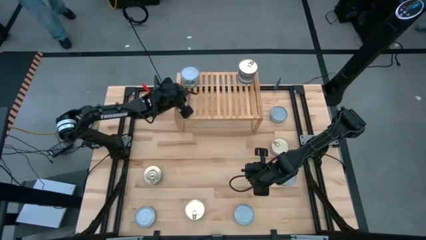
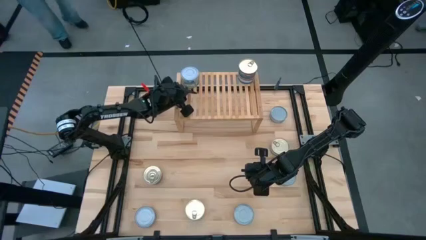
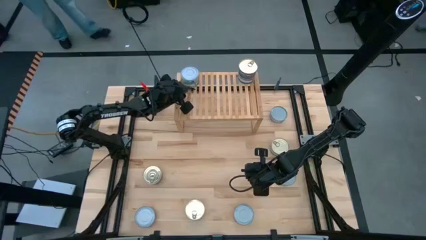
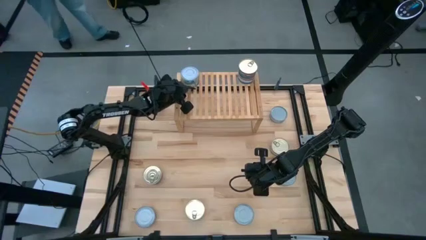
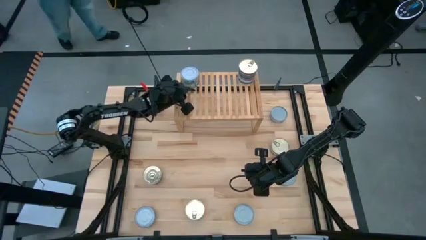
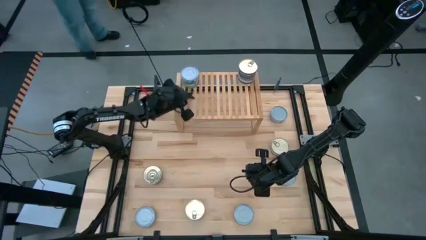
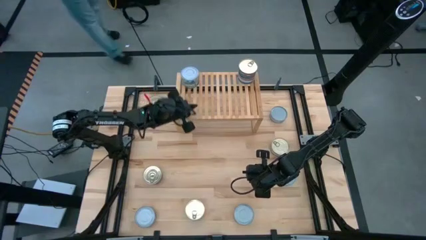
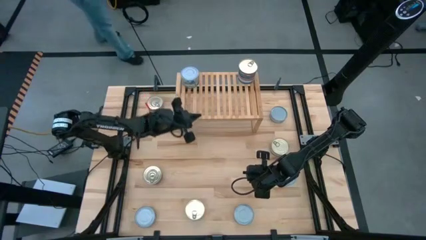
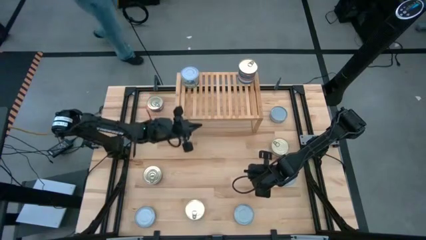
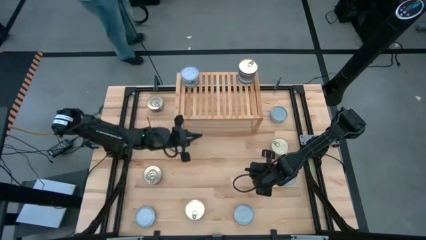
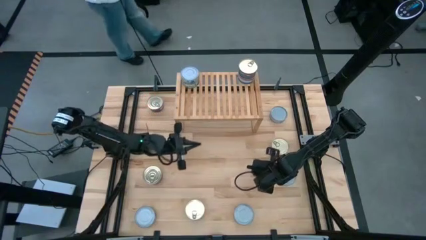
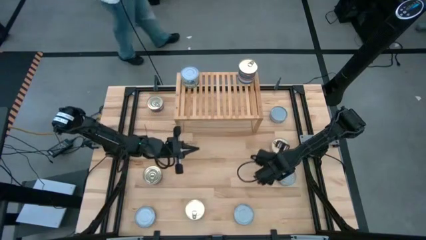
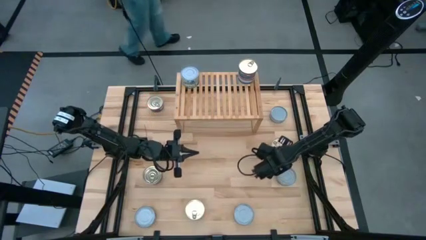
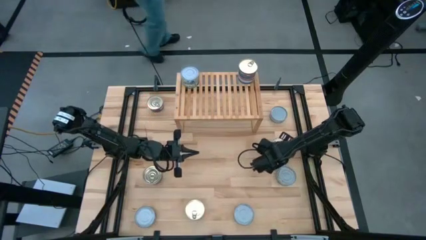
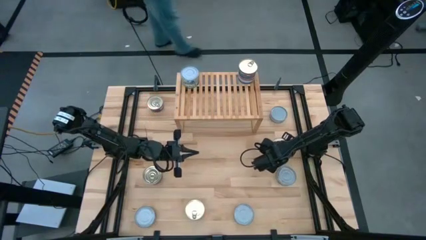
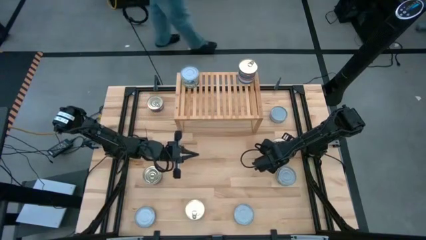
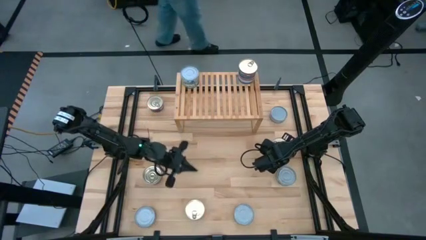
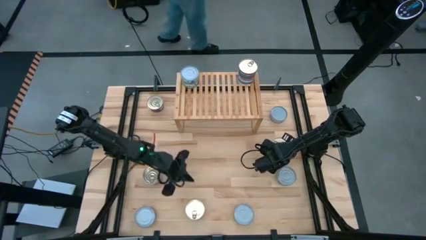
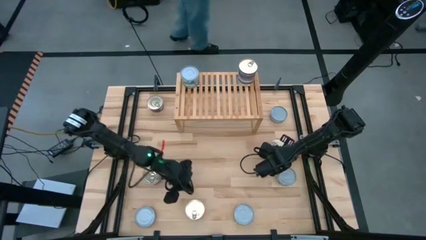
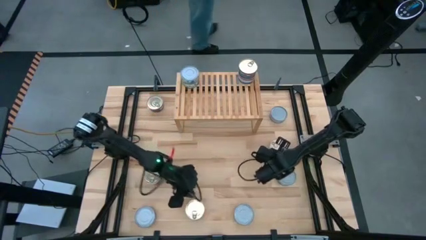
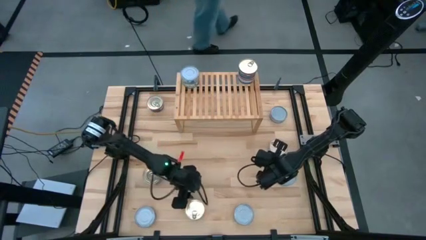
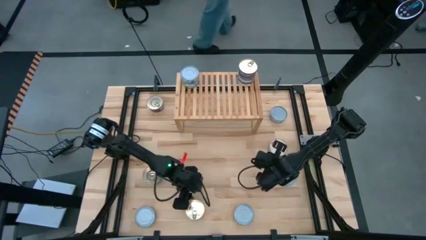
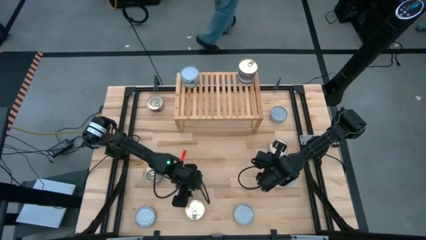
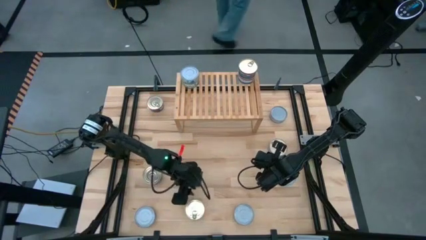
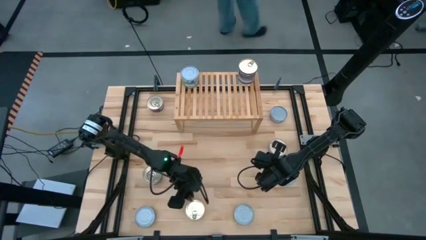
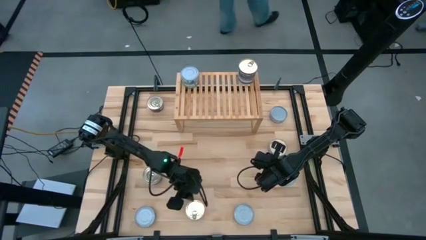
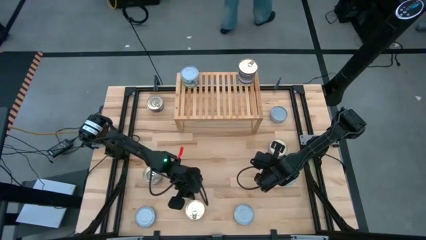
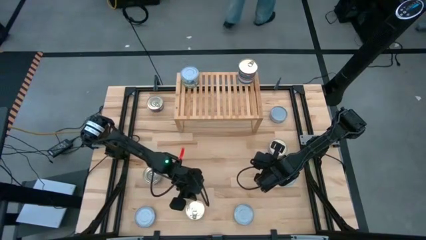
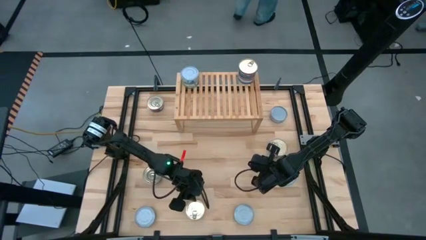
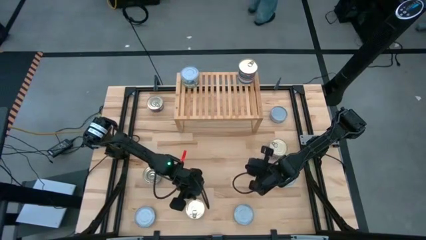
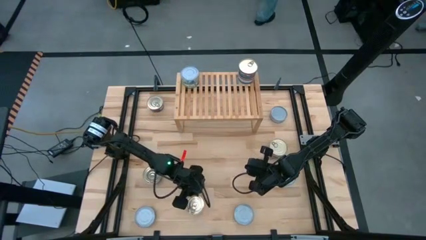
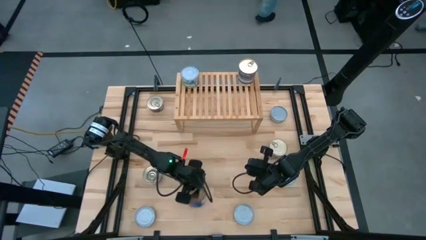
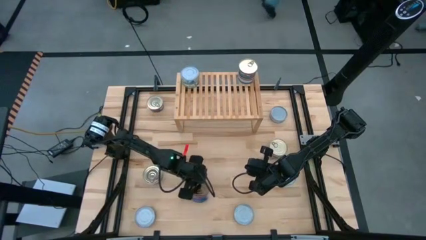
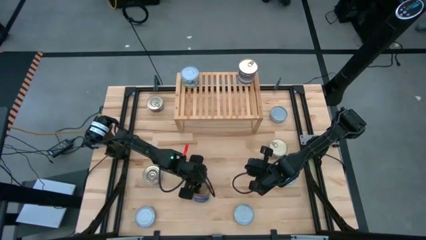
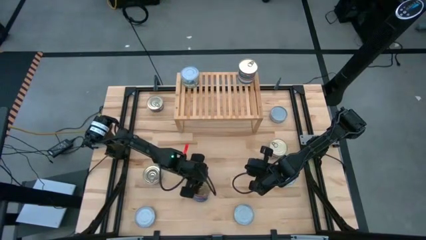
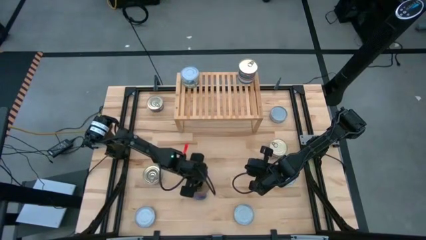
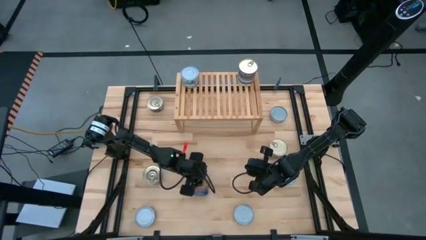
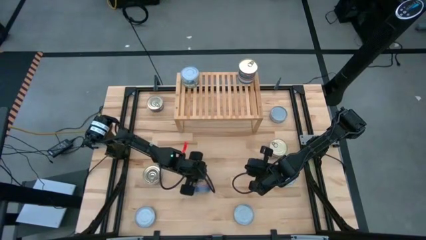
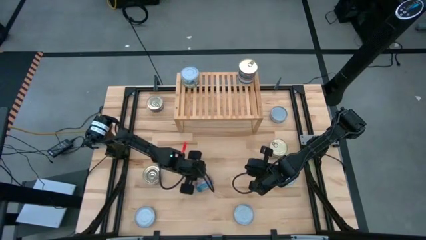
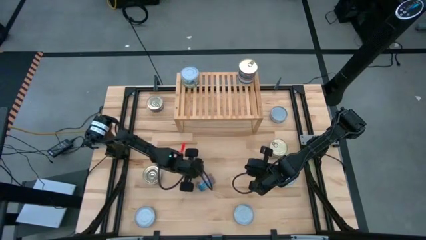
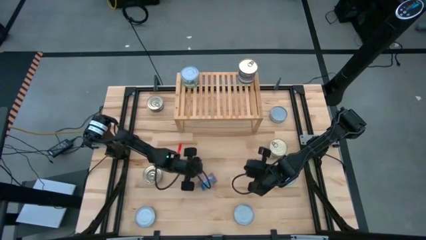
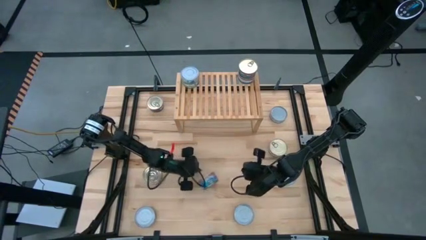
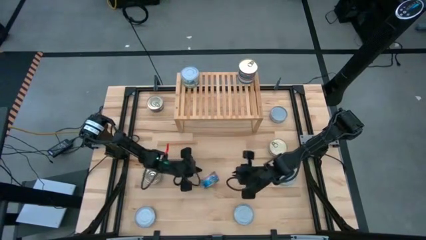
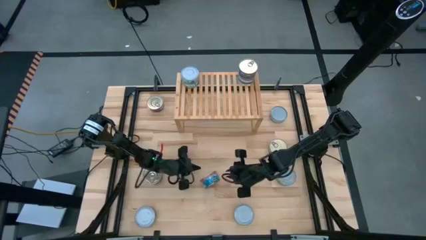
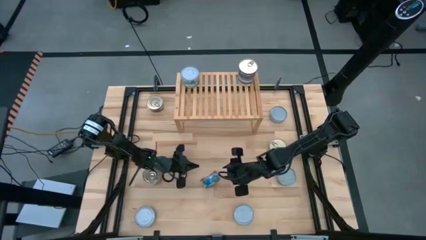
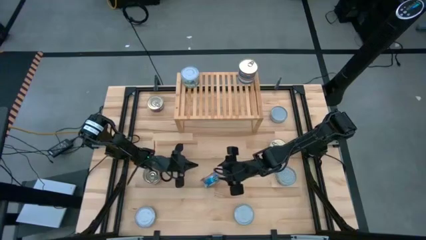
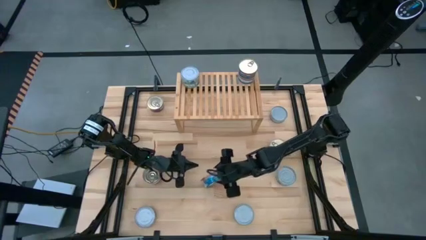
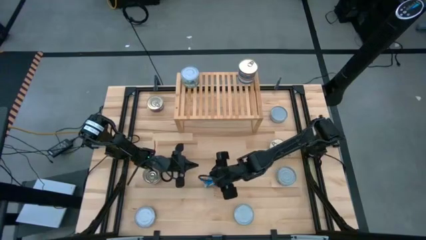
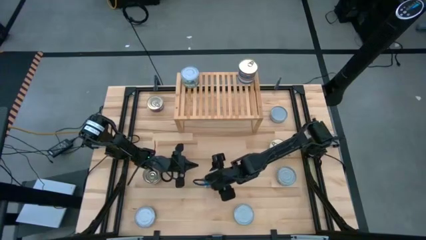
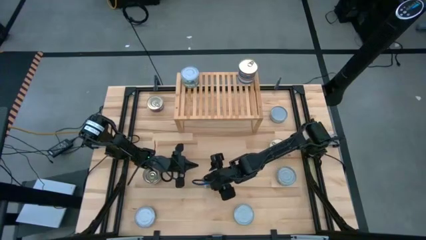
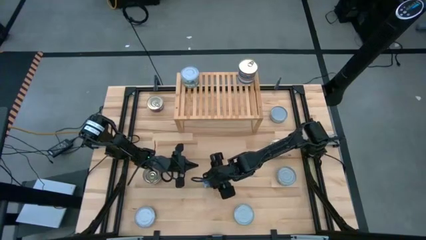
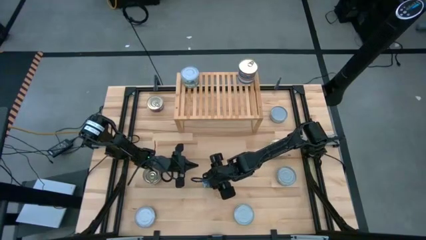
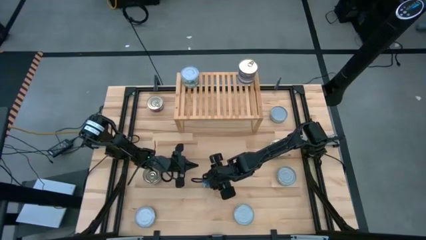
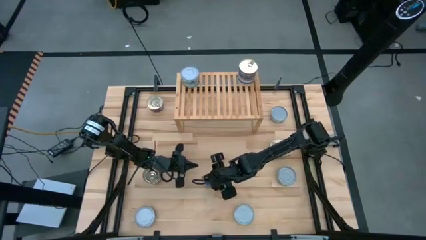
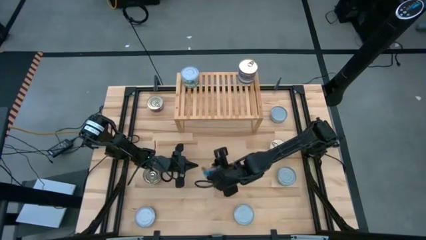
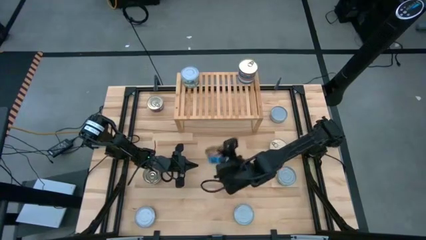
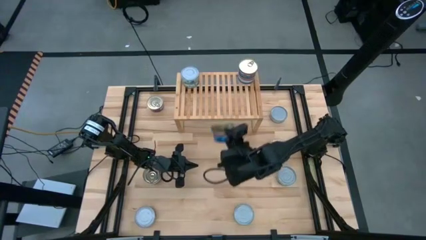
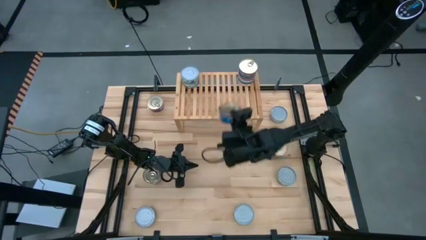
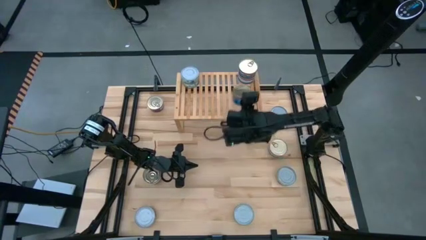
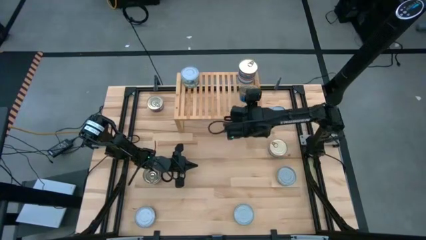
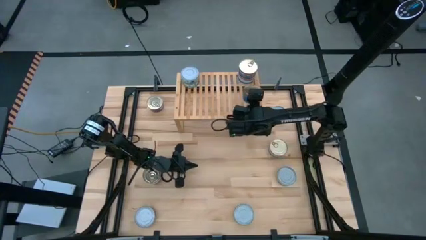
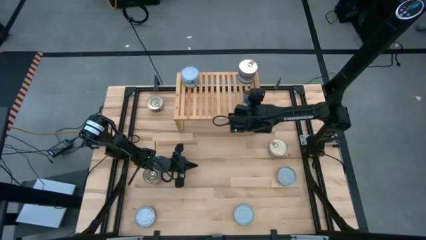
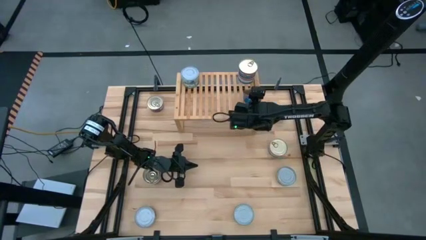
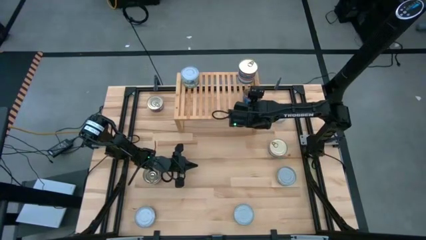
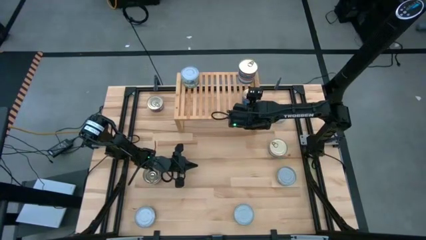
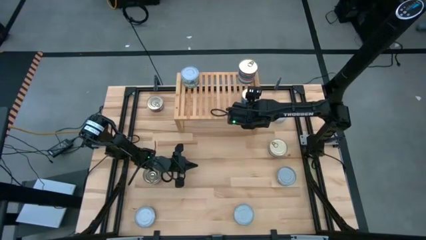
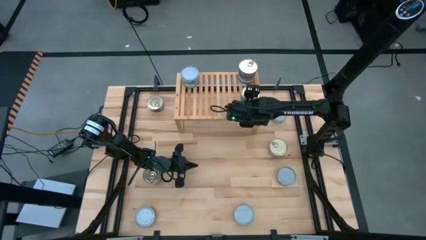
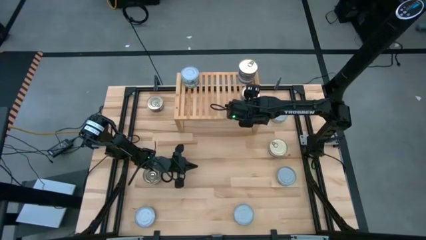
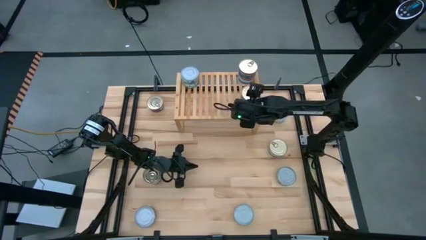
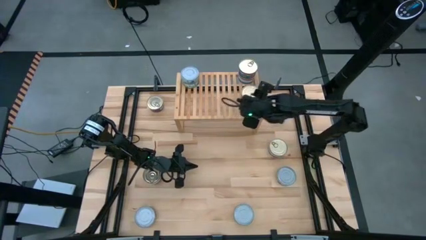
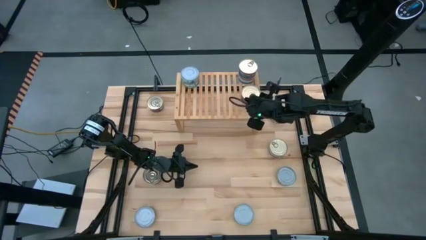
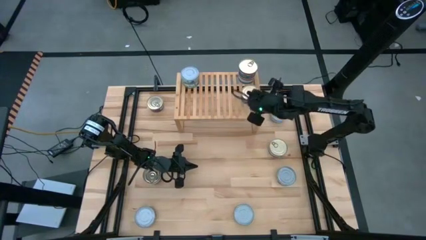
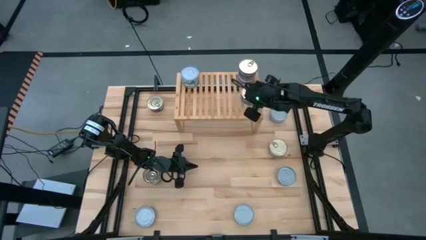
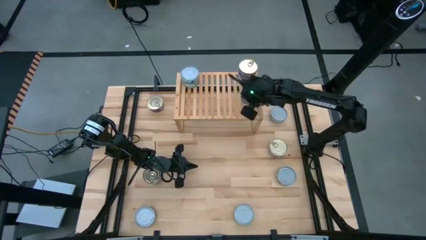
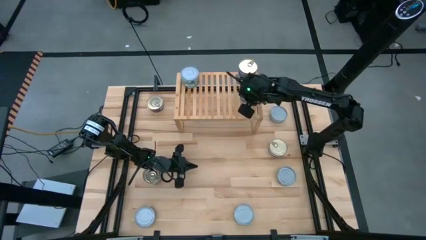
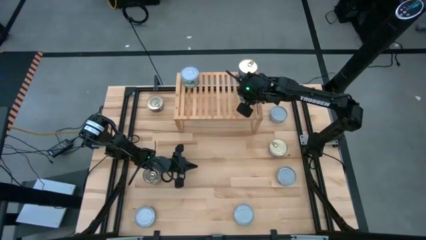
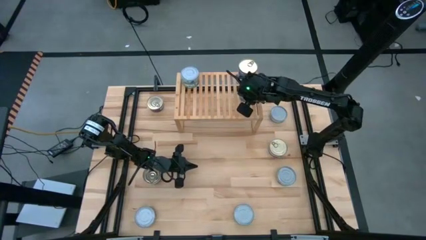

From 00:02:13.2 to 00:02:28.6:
Task: Stack canned seafood by type on shelf
Put the blue tuna can on the shelf

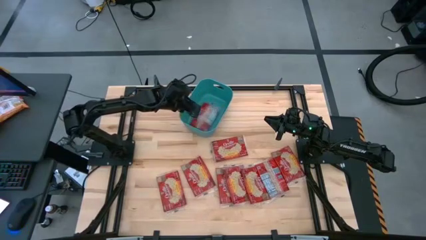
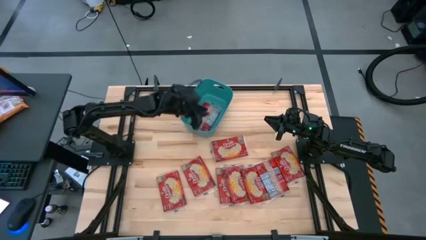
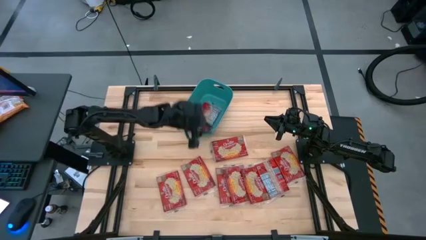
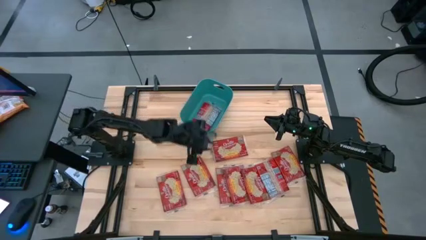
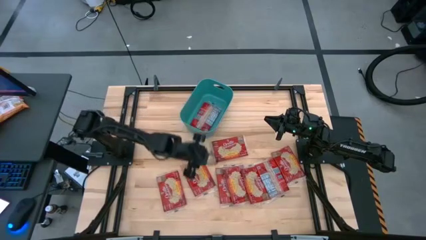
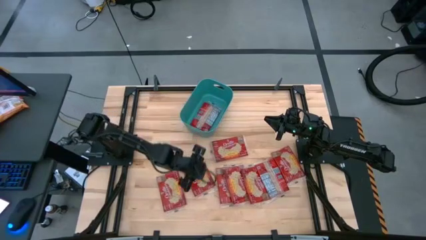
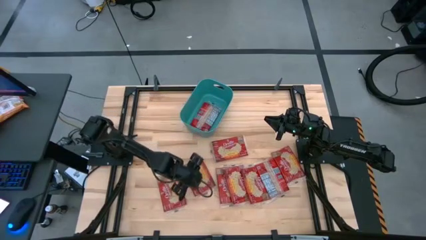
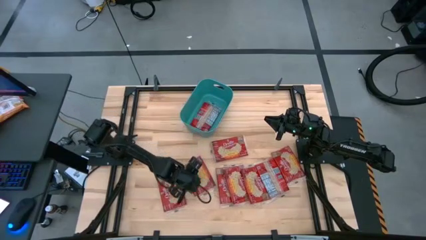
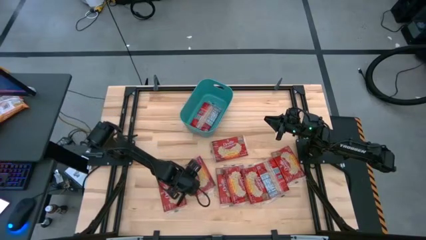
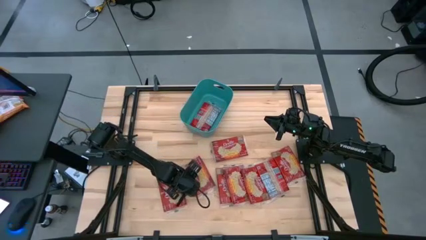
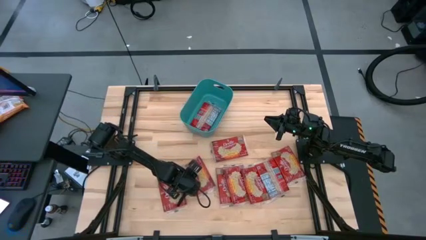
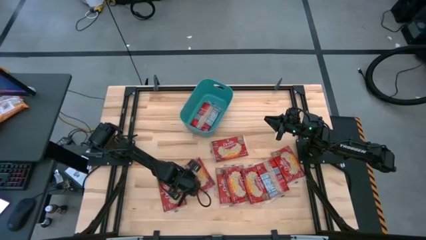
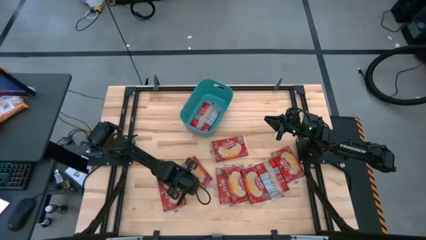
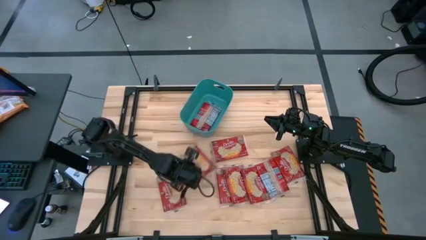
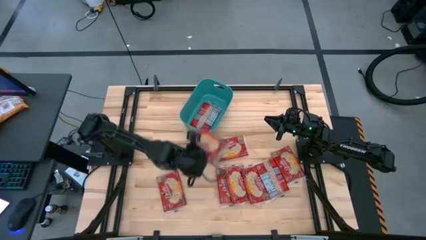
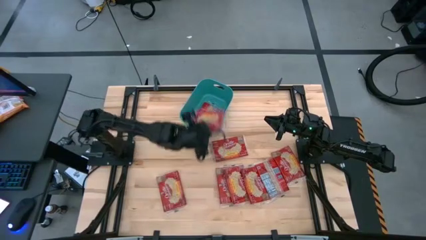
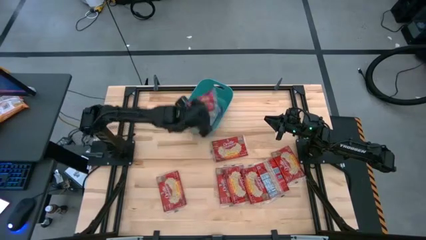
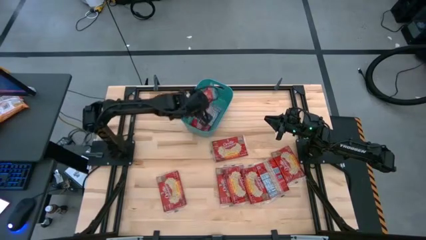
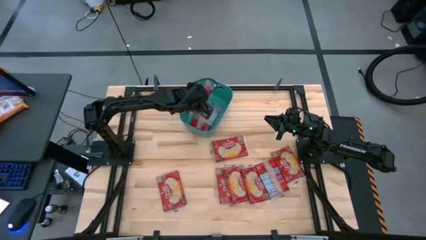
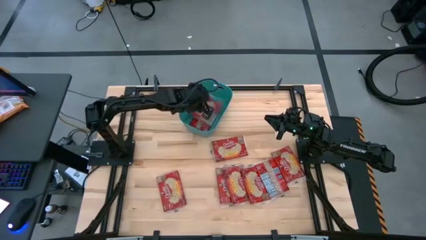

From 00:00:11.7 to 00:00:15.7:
Task: Sort popcorn bags into baskets
Put the popcorn bag into the green bin
